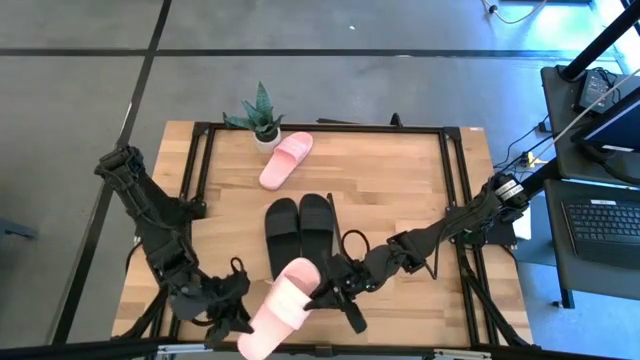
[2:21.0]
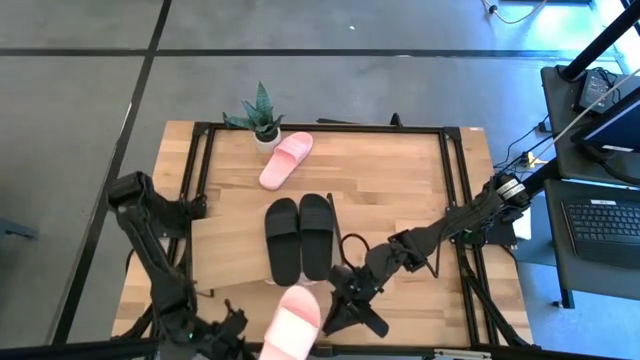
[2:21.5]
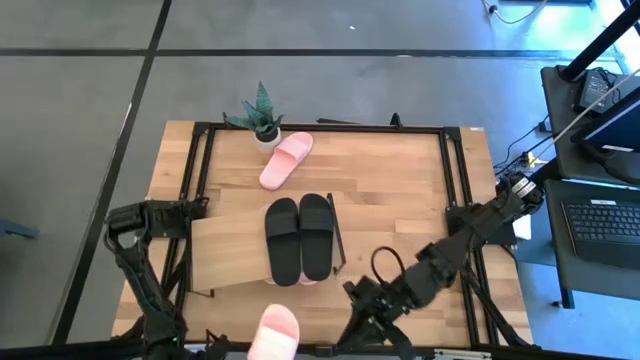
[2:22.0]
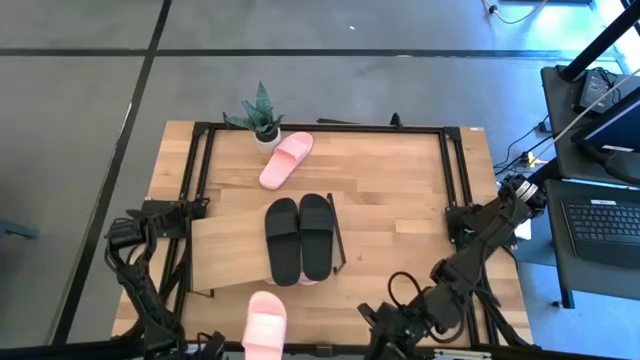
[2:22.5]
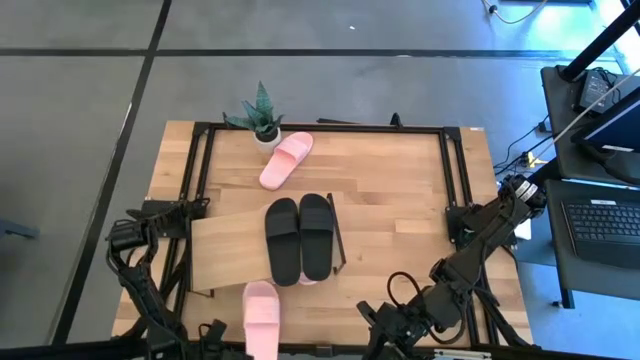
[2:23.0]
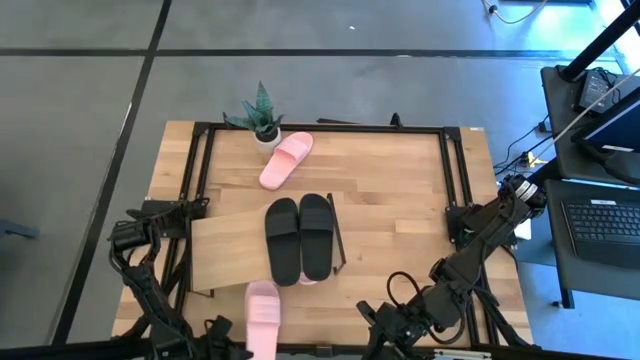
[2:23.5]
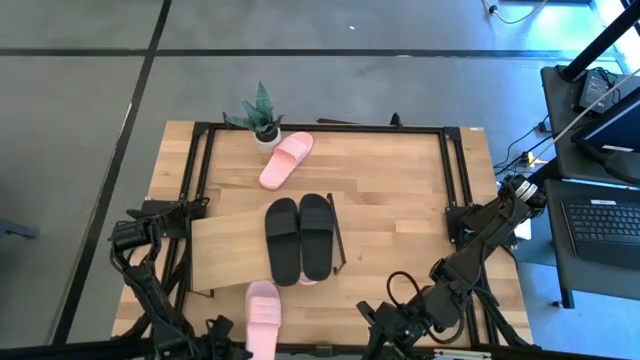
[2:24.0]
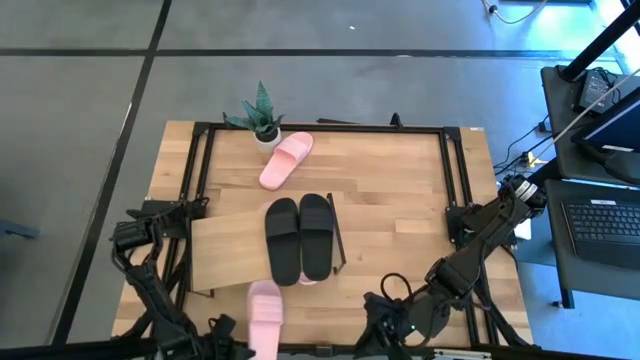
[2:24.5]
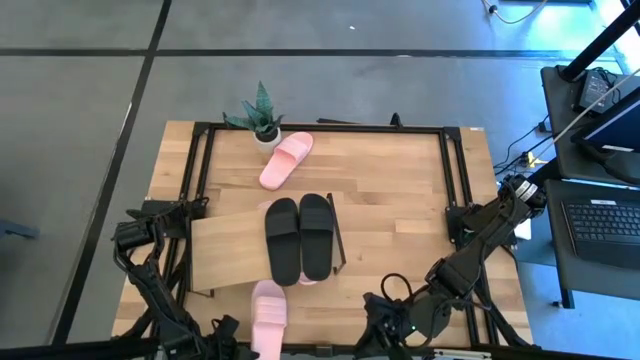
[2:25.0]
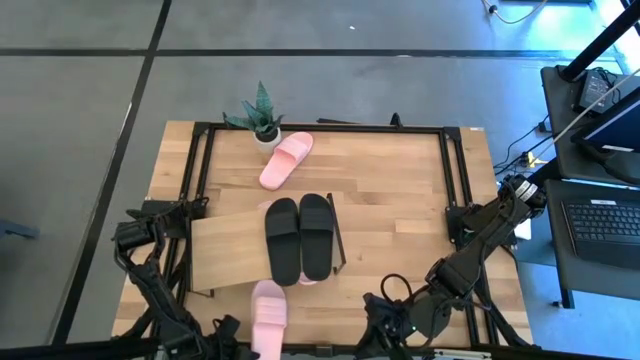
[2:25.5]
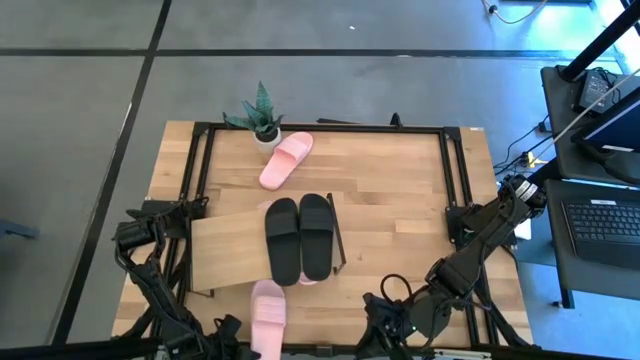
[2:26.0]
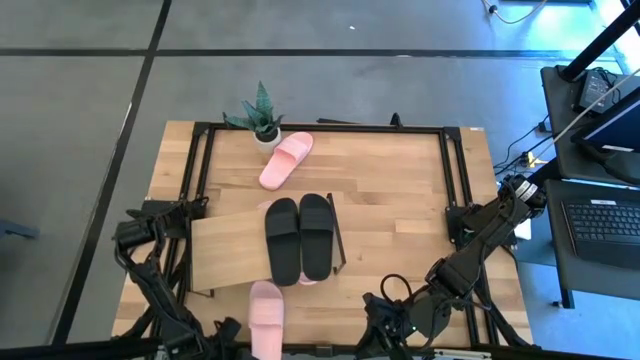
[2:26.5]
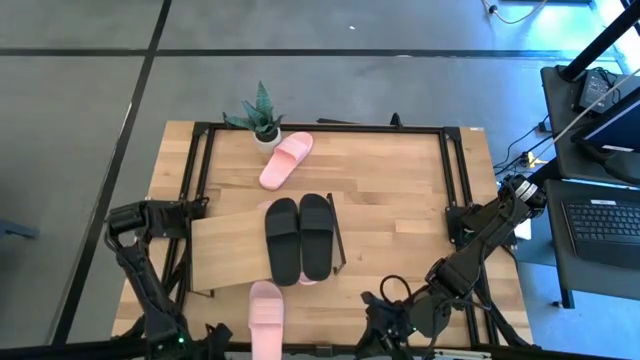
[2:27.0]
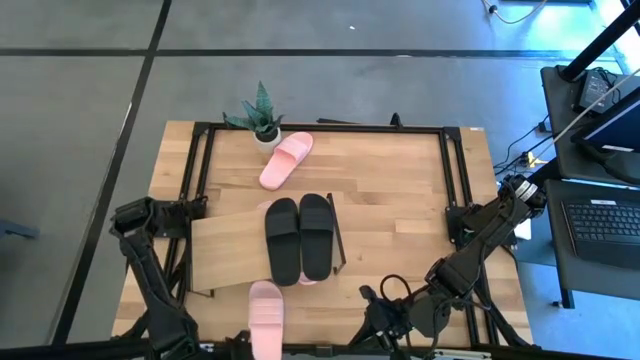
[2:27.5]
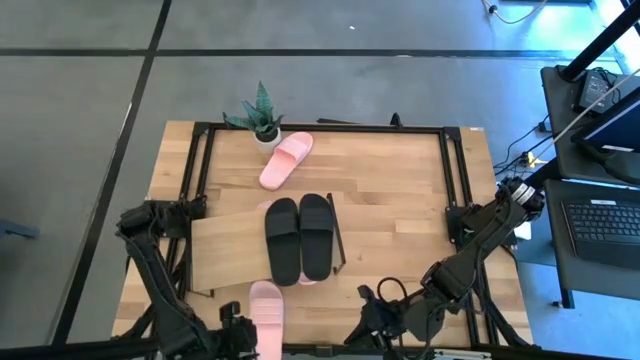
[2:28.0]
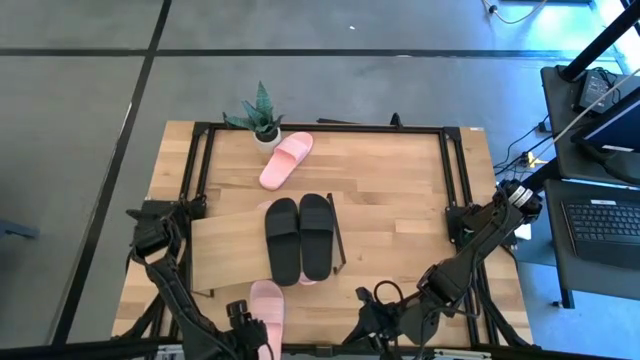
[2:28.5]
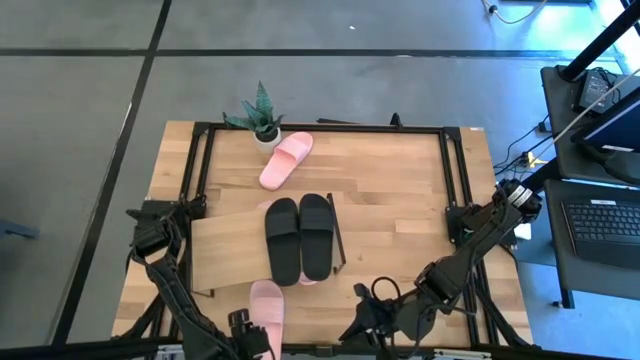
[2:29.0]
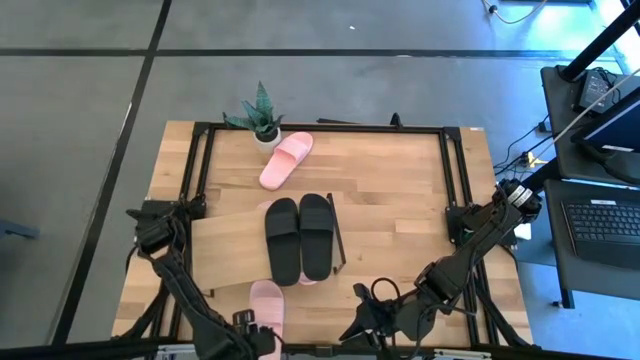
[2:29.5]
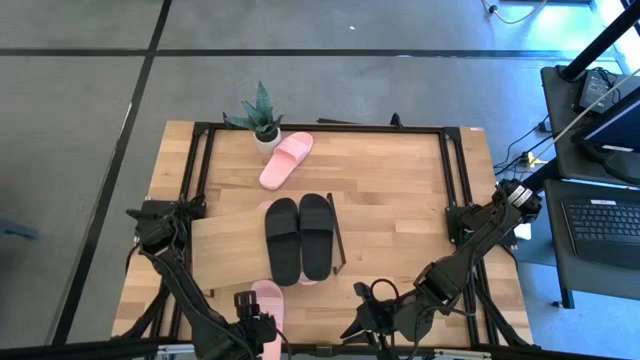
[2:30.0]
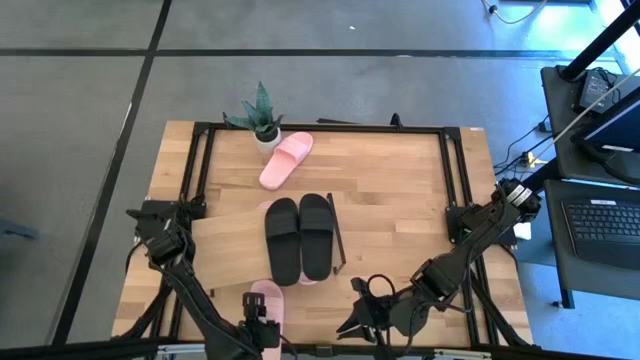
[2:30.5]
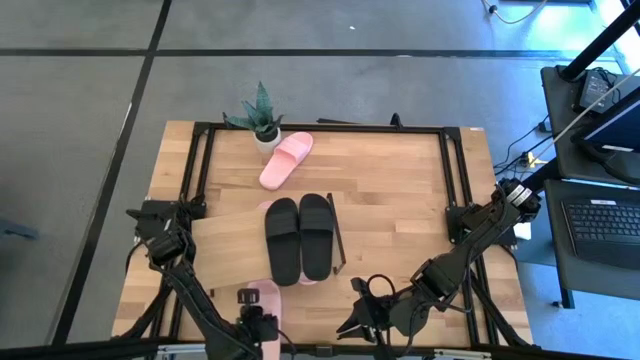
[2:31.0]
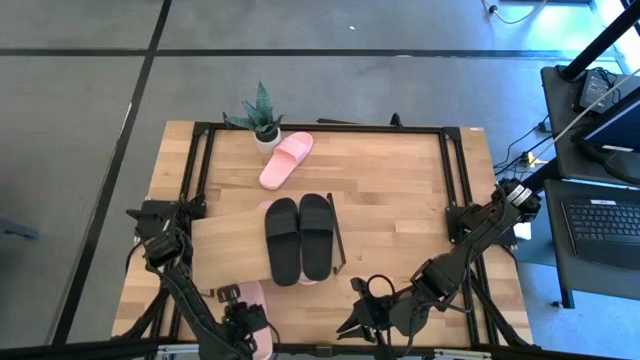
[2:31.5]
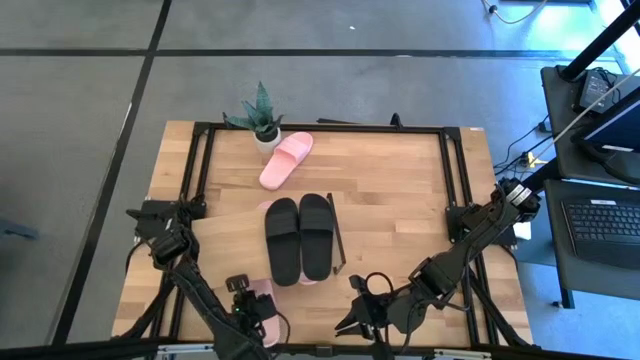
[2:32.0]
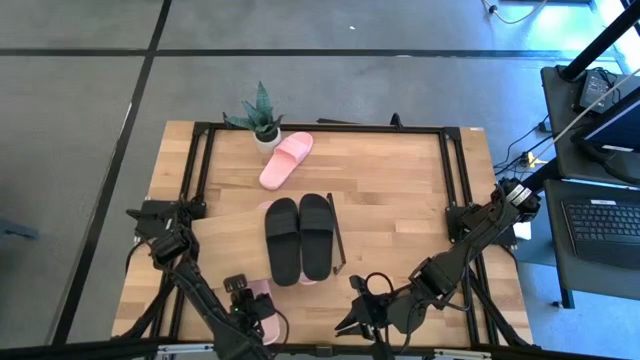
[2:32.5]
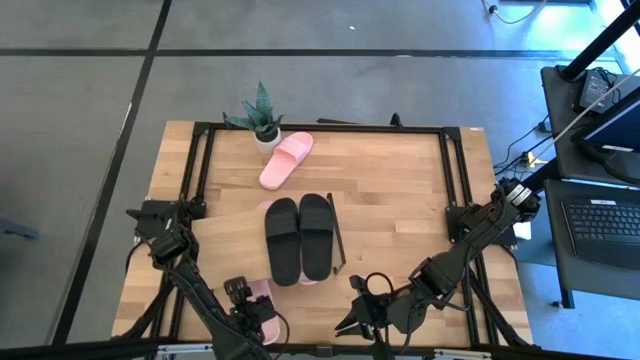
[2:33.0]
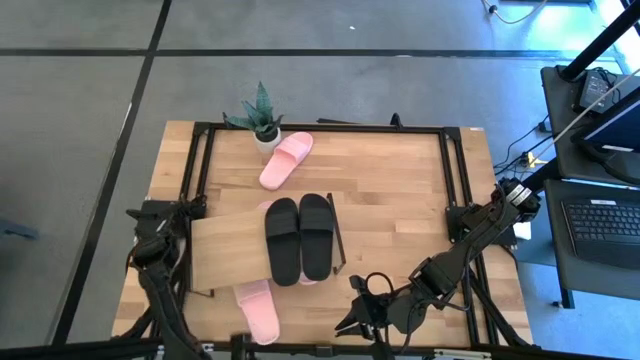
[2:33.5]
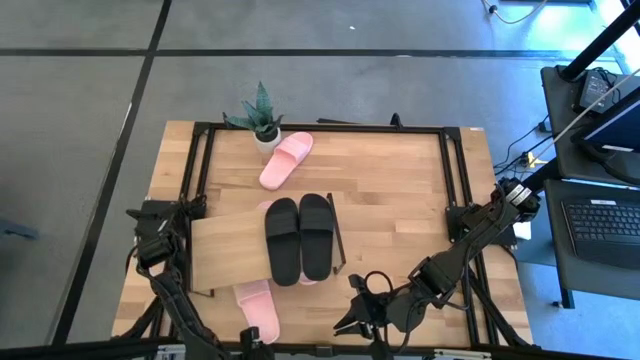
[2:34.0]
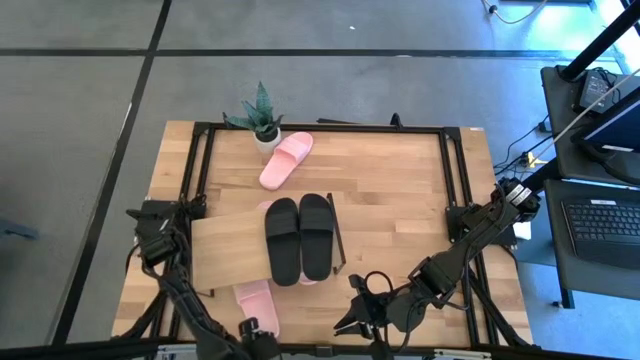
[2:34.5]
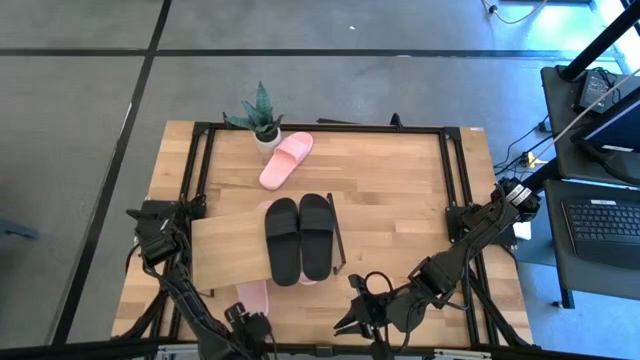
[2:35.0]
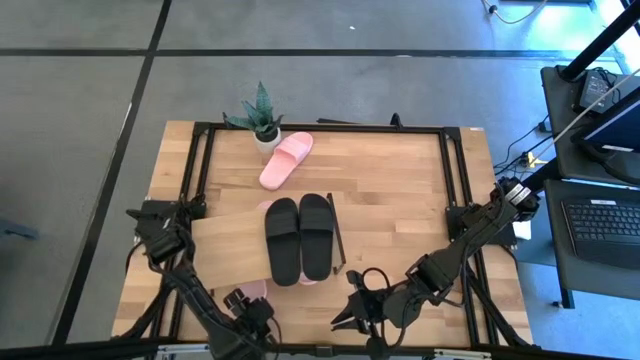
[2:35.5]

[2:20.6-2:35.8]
Task: Pick and place slides into the shelf
Put the pink slide under the shelf

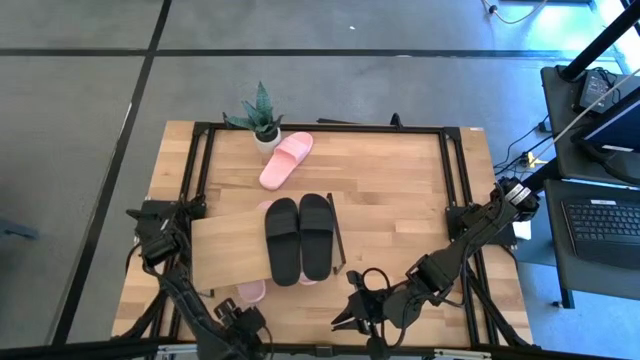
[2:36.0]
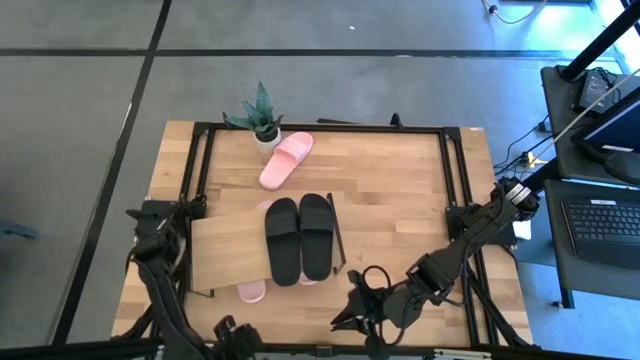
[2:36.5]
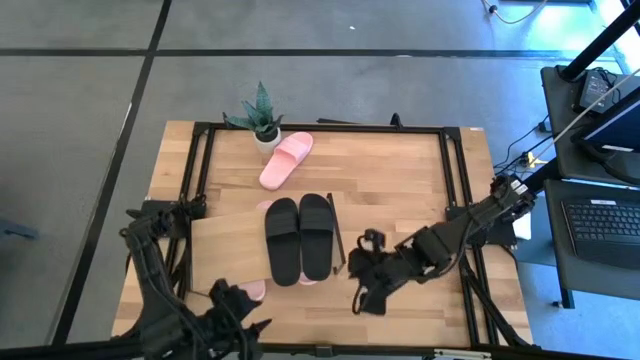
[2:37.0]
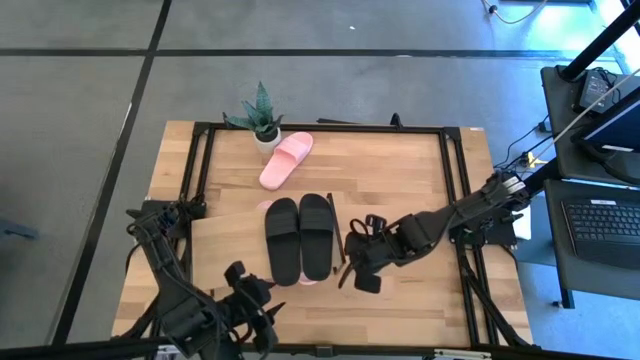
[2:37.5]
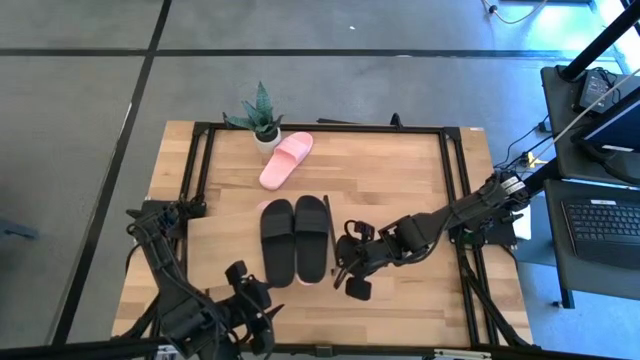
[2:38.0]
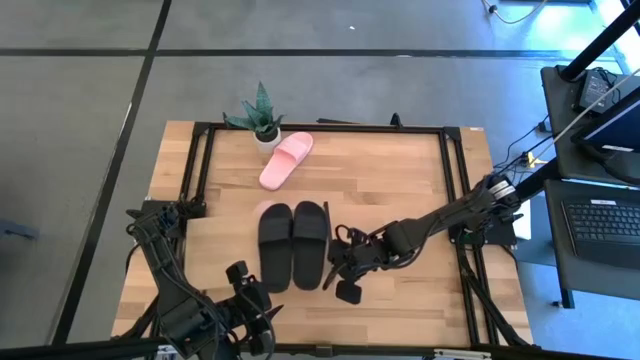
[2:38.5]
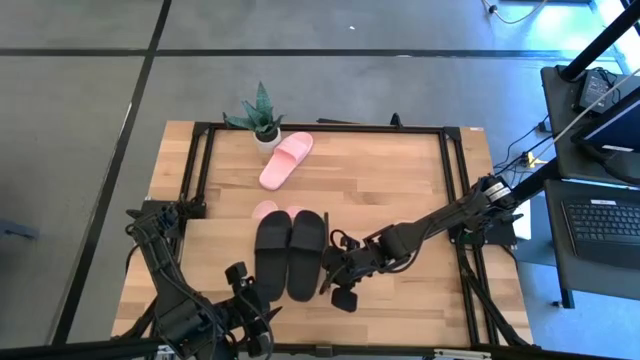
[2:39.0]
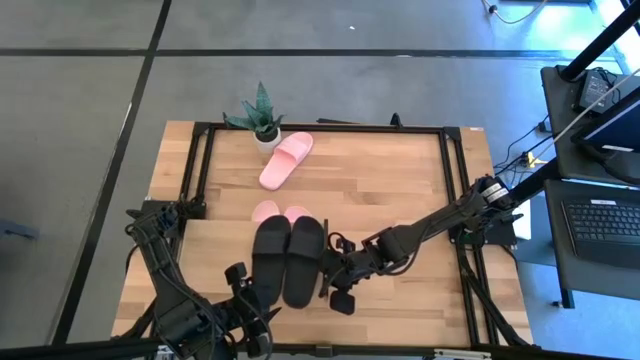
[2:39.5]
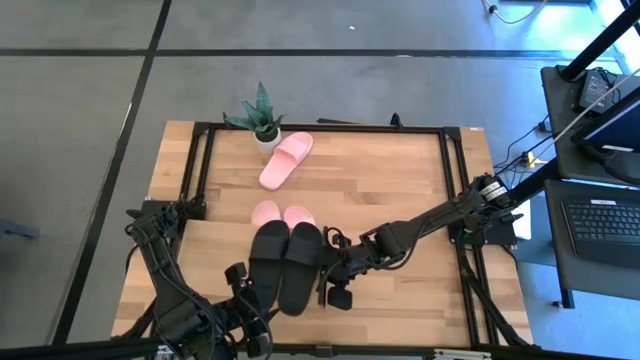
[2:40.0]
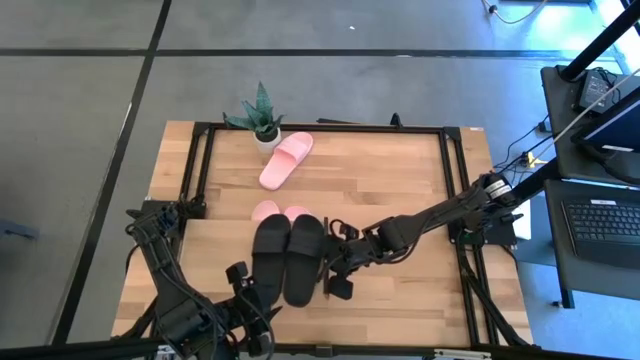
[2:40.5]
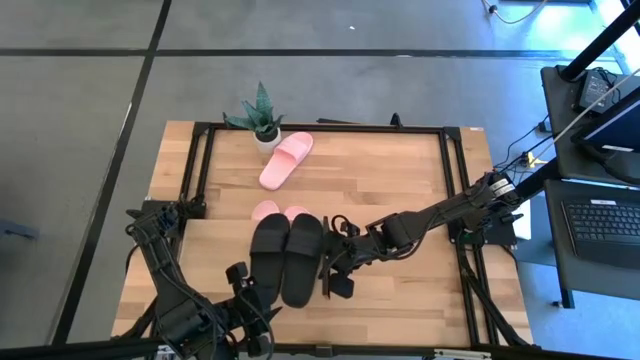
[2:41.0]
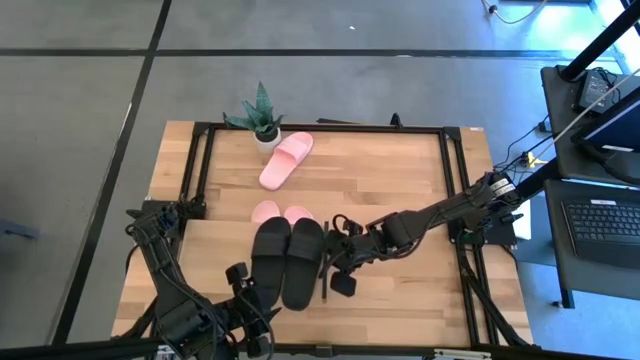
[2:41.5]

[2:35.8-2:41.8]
Adjust the shelf

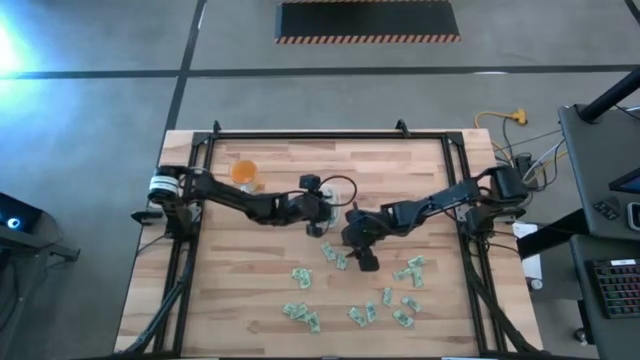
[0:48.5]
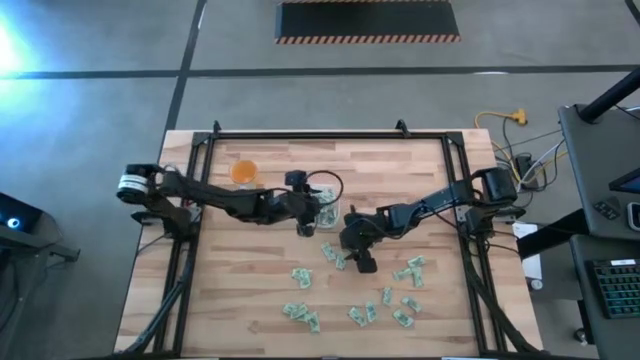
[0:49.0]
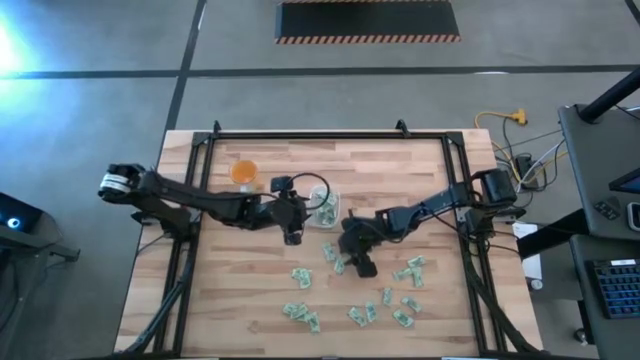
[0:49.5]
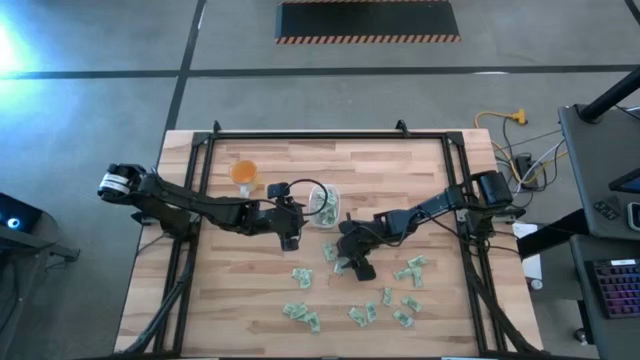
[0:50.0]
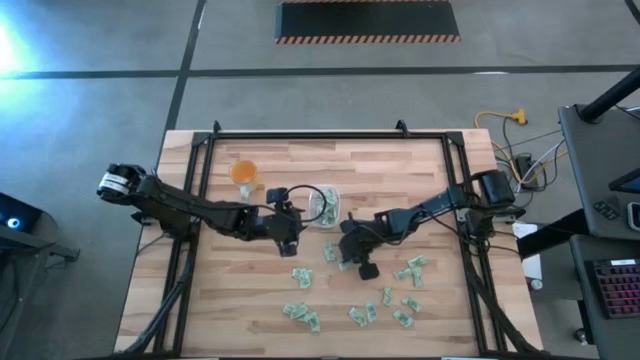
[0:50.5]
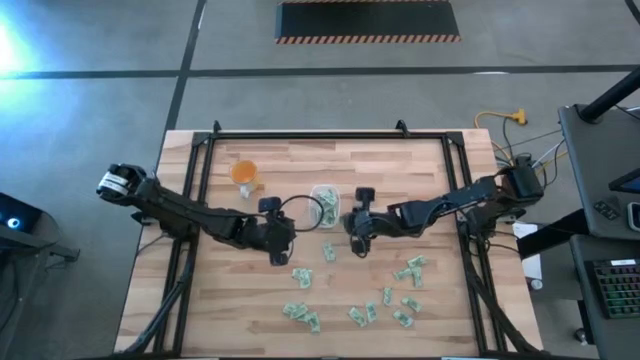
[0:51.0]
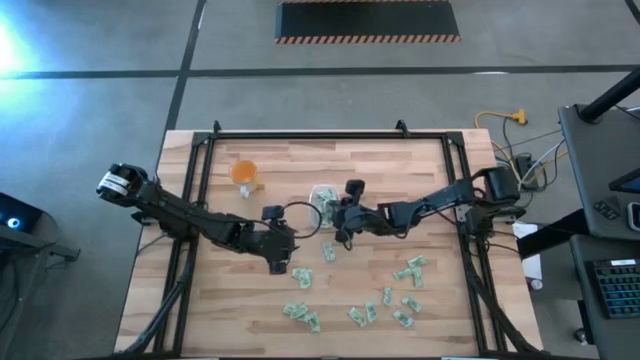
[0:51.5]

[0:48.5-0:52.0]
Task: Pick and place Stevia / Truvia into bins
Put the stevia packet into the bin
